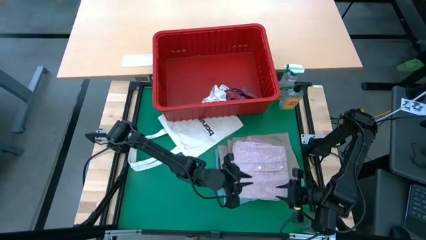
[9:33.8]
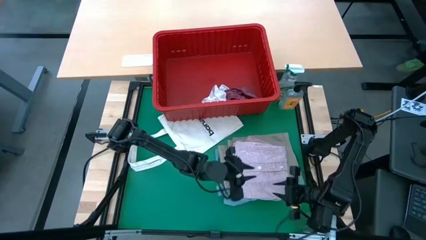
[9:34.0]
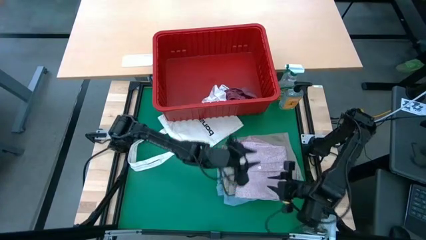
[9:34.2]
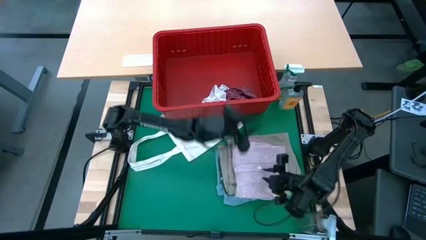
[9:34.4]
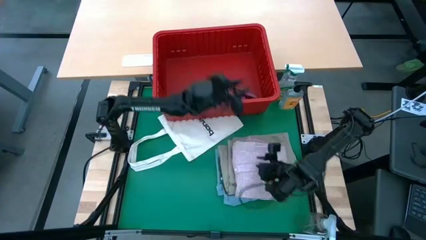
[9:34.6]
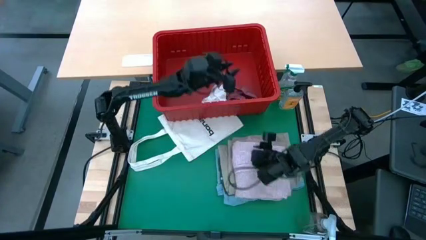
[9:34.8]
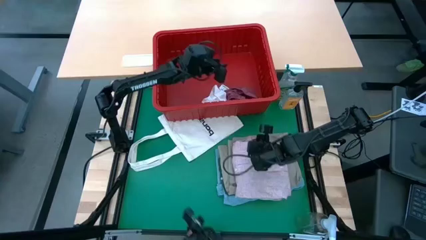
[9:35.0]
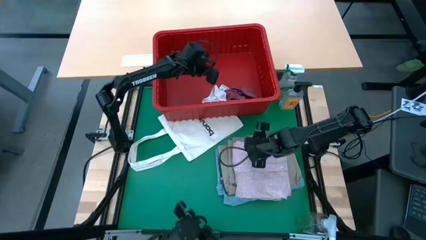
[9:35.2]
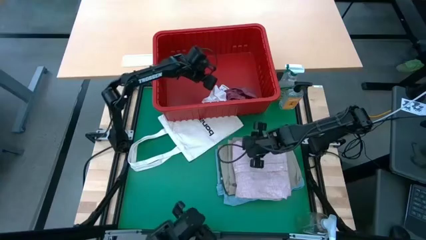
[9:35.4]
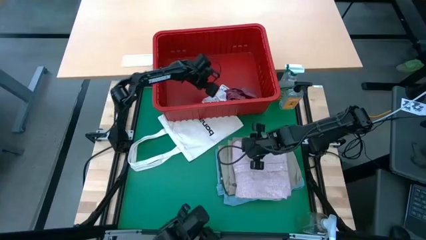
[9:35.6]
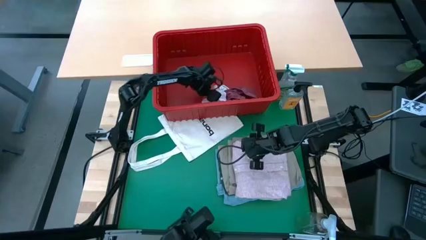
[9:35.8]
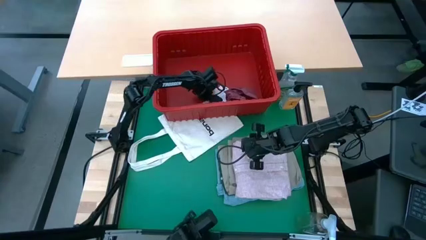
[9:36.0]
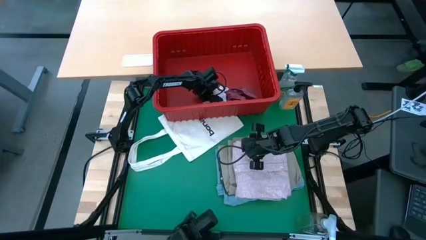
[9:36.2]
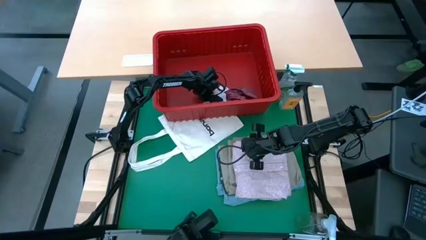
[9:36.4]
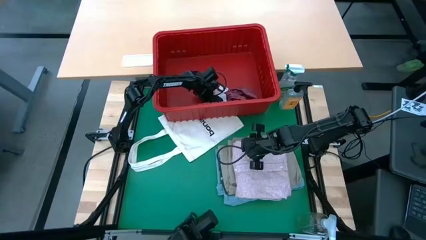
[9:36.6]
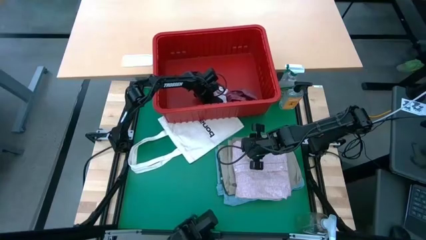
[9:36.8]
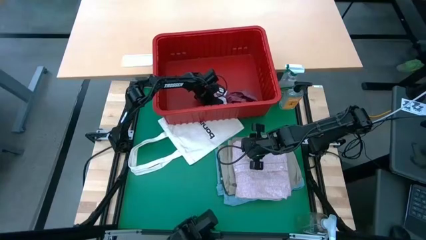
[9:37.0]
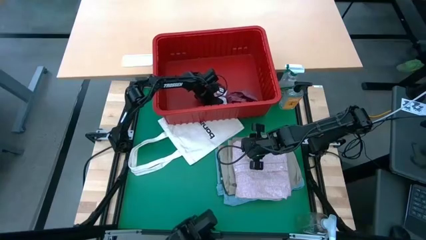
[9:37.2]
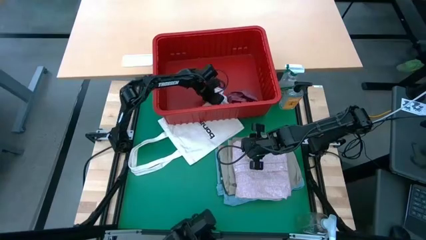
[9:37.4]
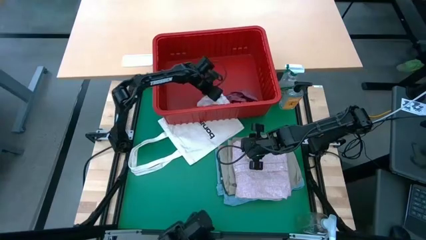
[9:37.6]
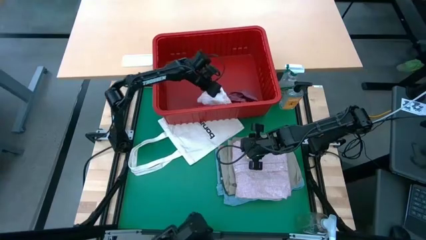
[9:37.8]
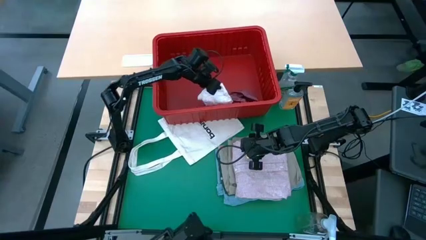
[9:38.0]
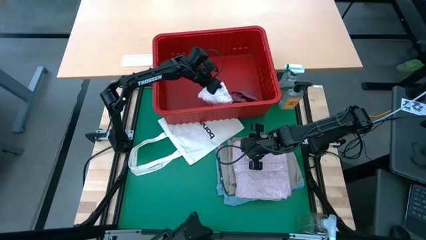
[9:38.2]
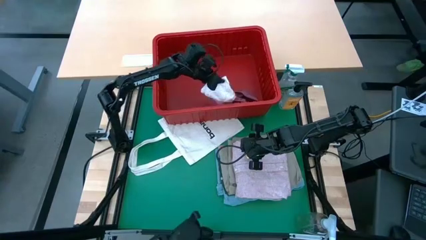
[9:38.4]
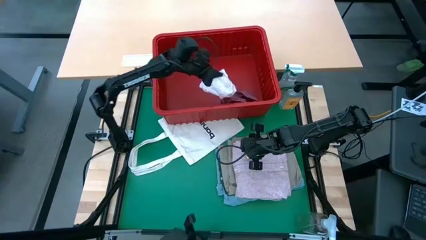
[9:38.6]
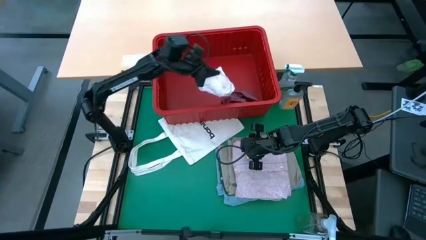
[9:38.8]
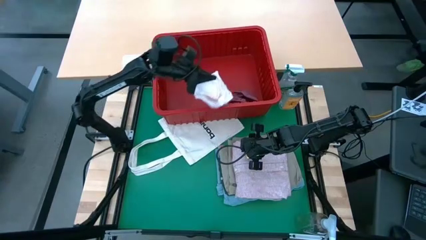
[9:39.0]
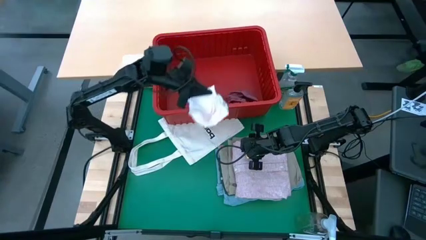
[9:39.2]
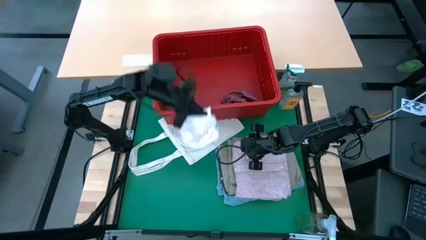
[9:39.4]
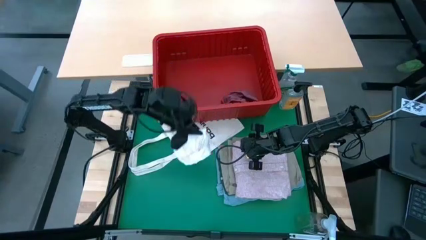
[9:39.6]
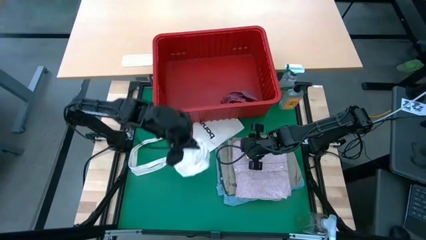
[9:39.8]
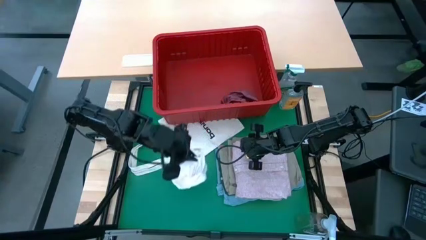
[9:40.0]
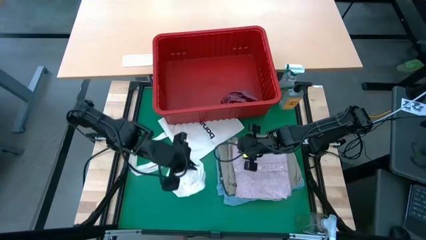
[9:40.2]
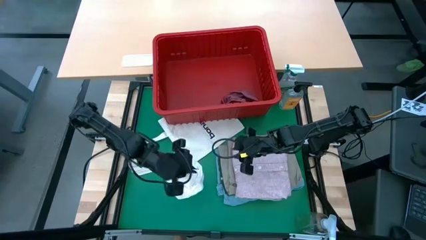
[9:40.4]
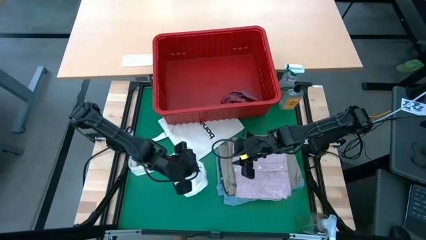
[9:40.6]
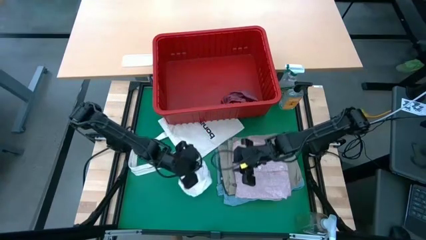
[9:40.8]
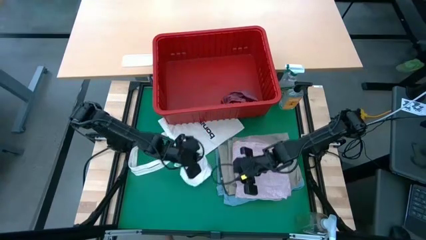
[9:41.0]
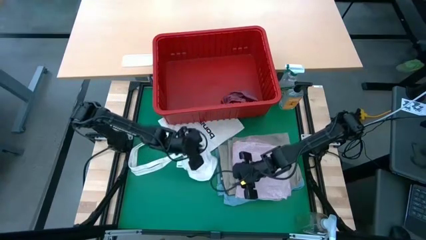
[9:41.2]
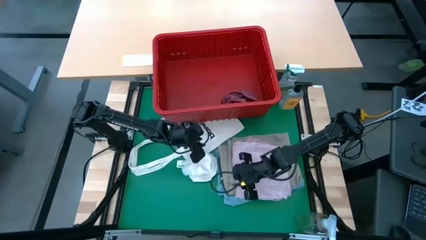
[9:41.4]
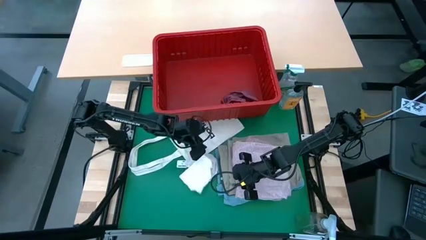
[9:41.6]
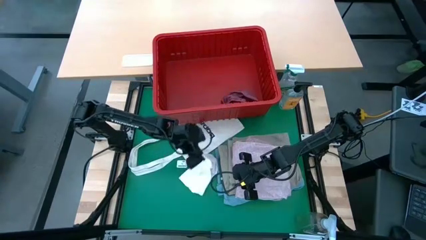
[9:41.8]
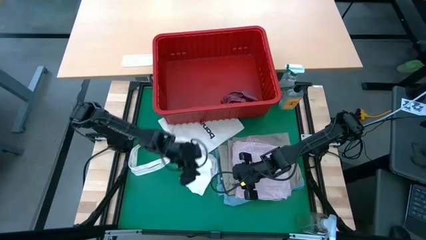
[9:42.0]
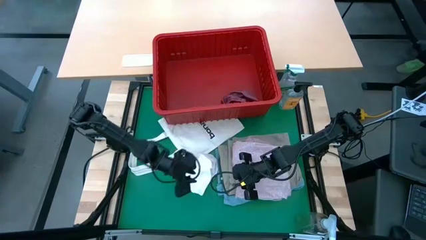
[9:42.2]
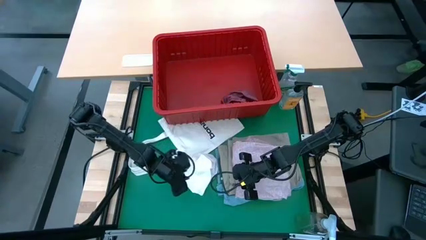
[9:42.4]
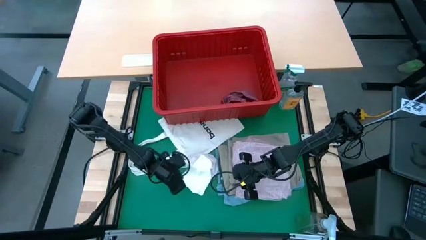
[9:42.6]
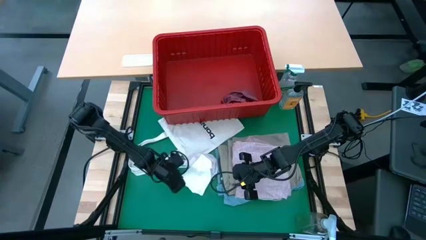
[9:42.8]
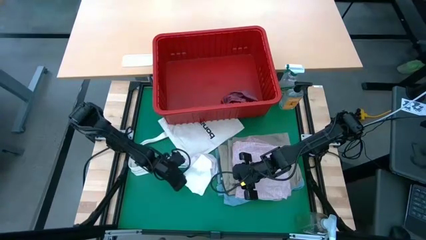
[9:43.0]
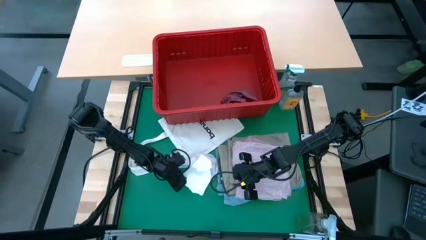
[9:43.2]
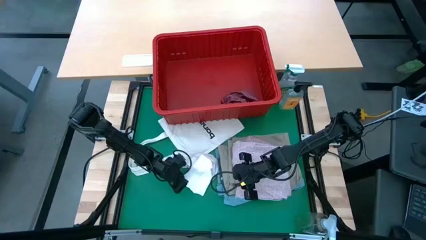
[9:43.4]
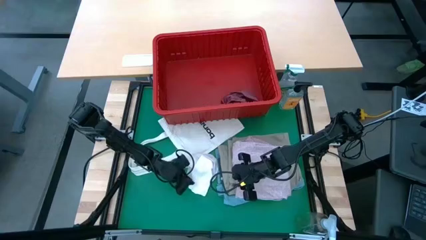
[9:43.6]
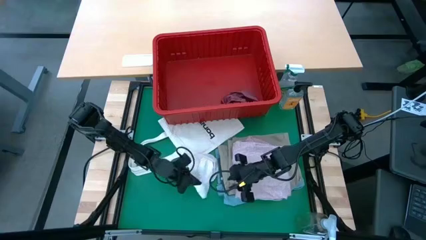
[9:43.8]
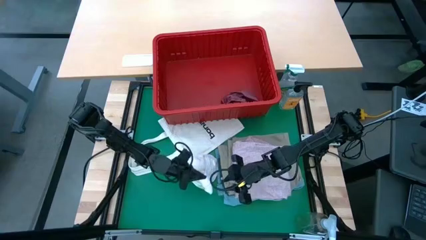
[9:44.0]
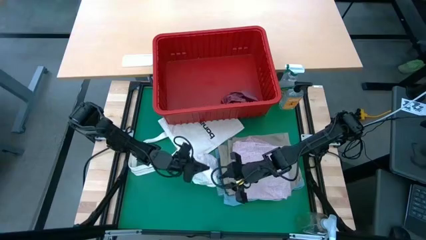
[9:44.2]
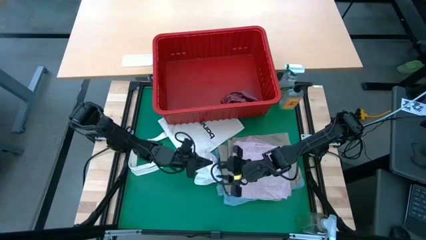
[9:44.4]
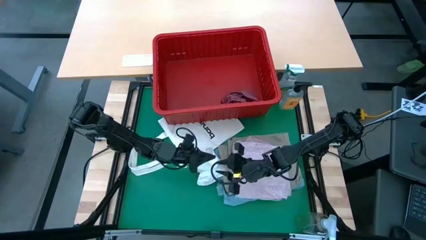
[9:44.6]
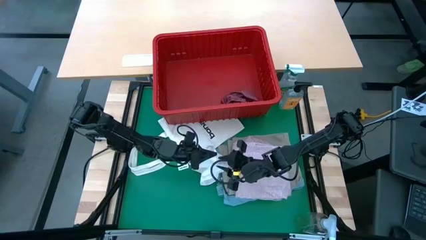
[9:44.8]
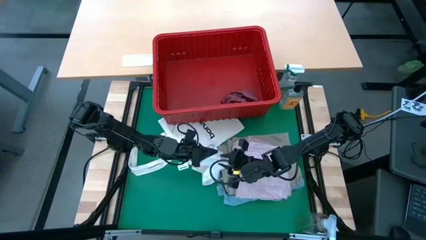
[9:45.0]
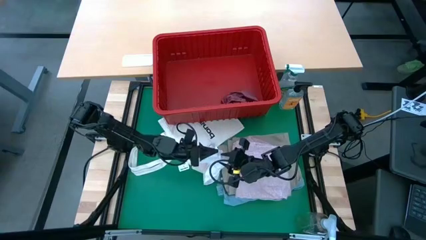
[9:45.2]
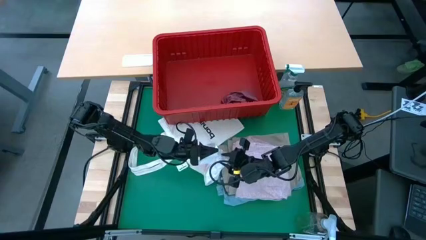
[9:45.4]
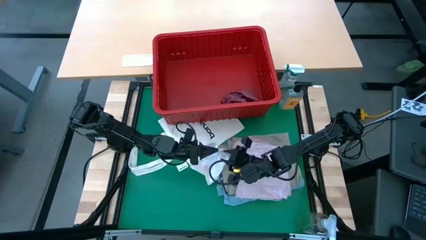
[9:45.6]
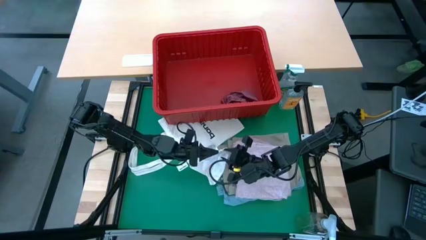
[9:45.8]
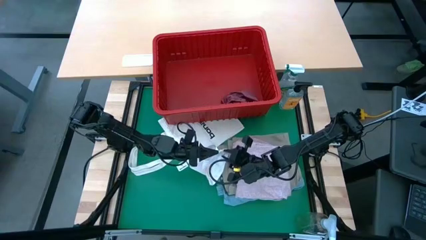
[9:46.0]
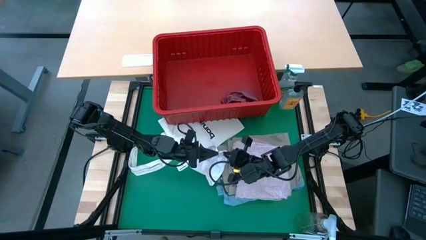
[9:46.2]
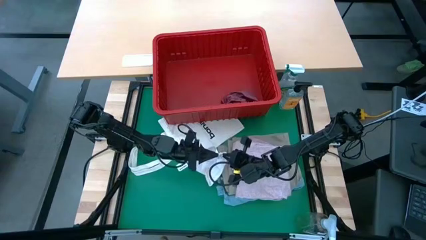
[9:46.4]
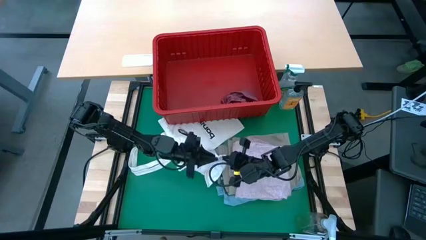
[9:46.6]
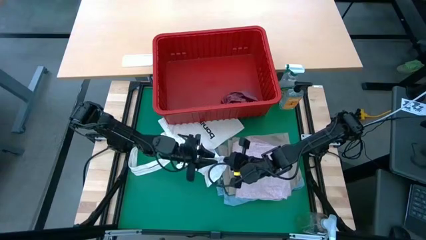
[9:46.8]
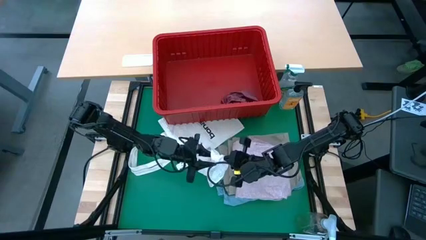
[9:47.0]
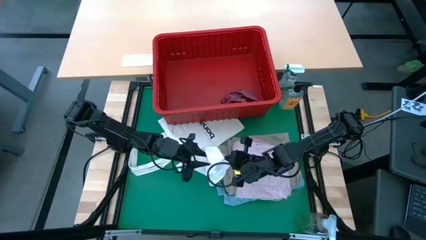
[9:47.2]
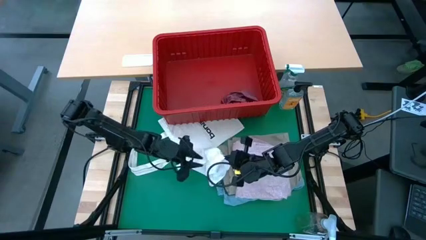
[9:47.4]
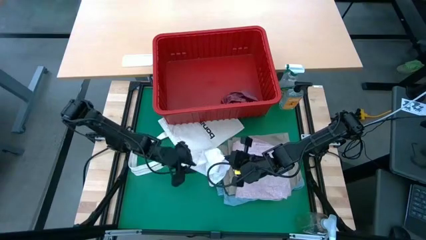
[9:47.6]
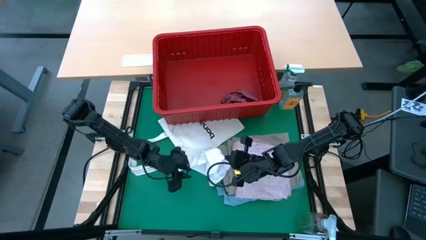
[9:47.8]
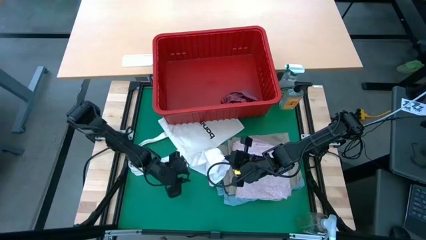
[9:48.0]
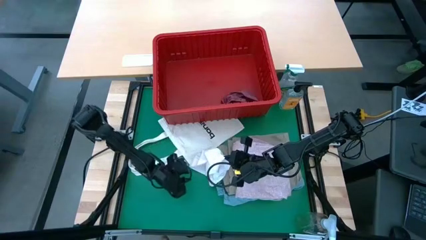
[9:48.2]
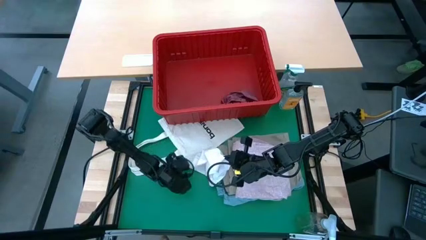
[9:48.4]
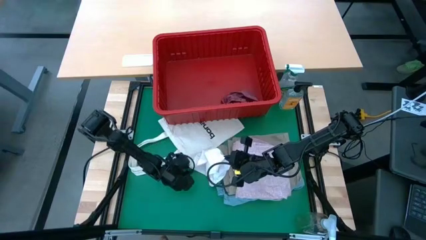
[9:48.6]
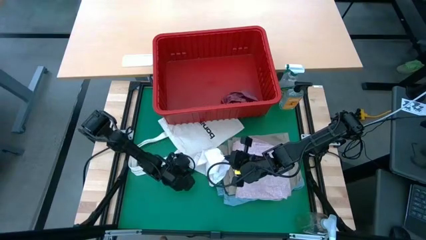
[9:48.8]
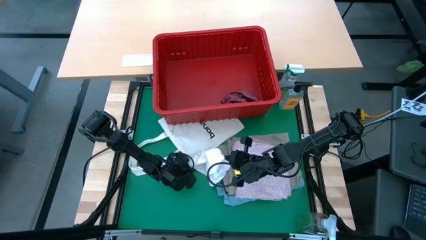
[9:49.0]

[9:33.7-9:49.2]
Task: Fold laundry
Fold the white underwear
